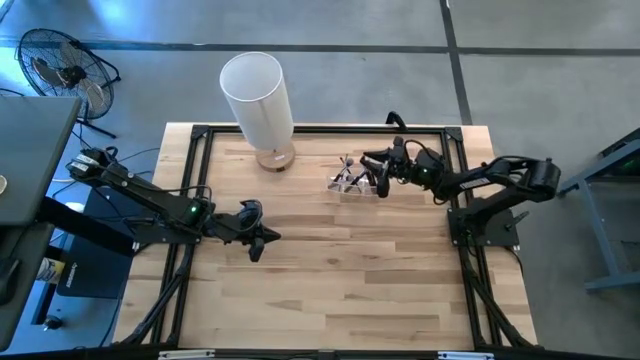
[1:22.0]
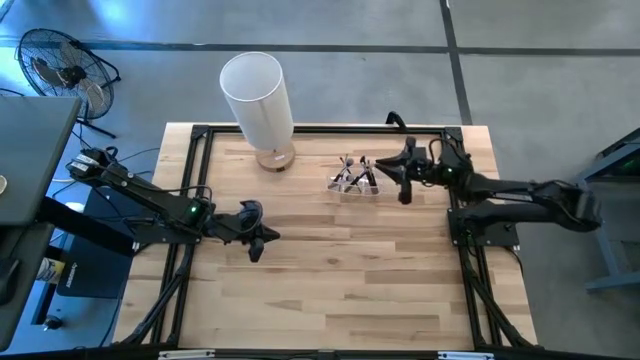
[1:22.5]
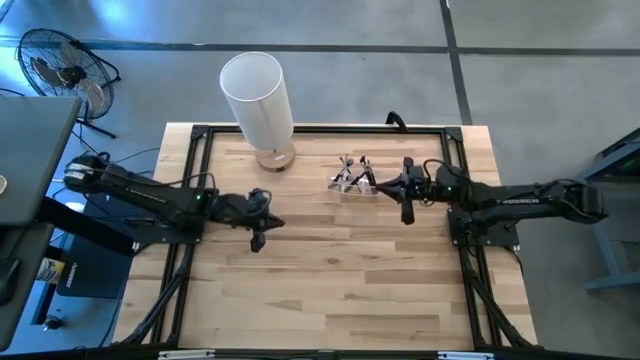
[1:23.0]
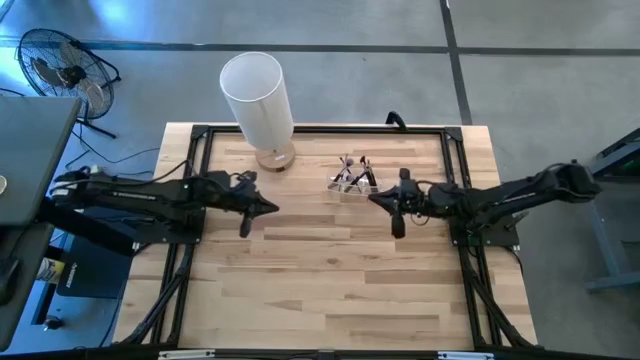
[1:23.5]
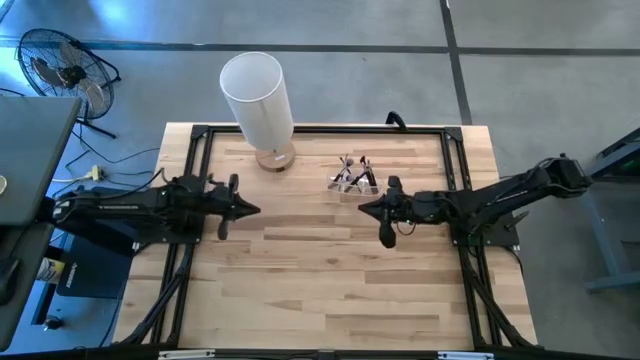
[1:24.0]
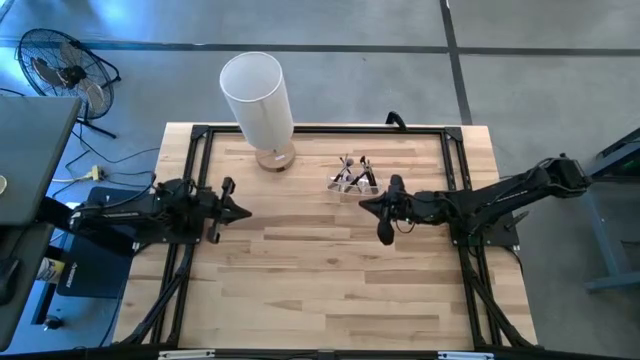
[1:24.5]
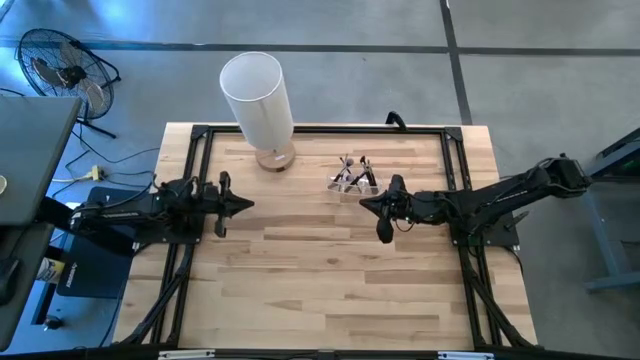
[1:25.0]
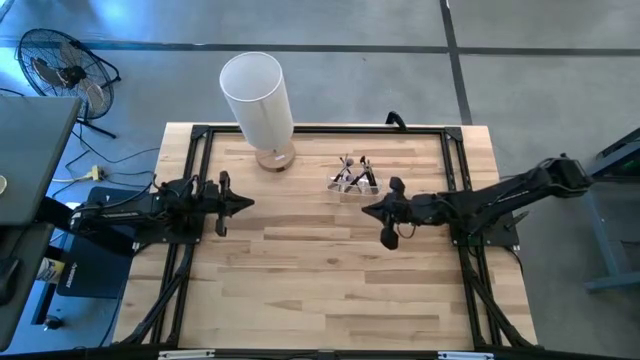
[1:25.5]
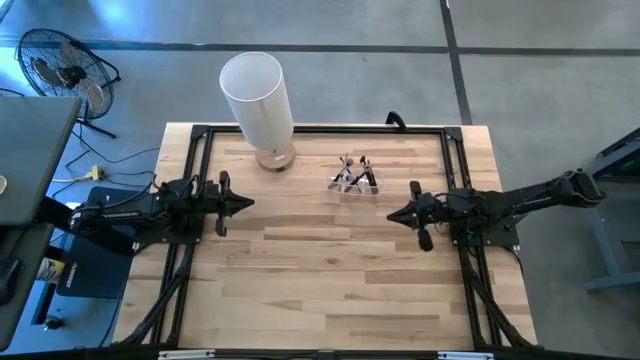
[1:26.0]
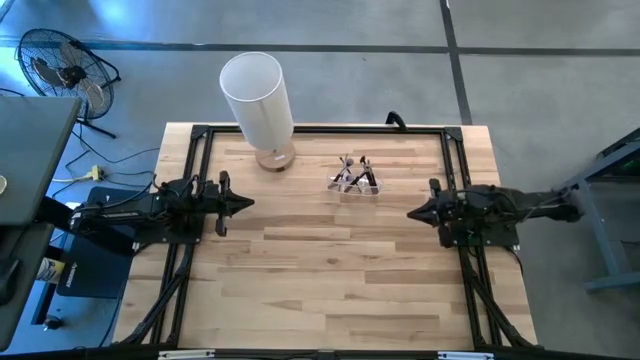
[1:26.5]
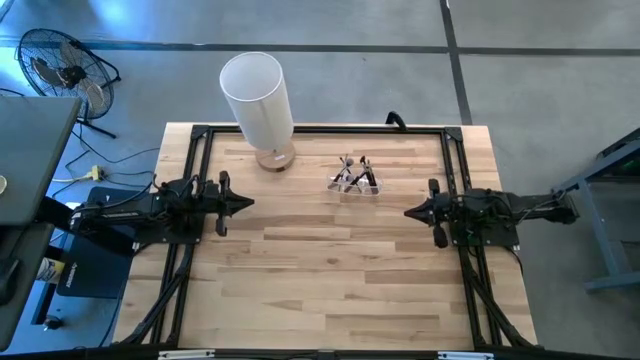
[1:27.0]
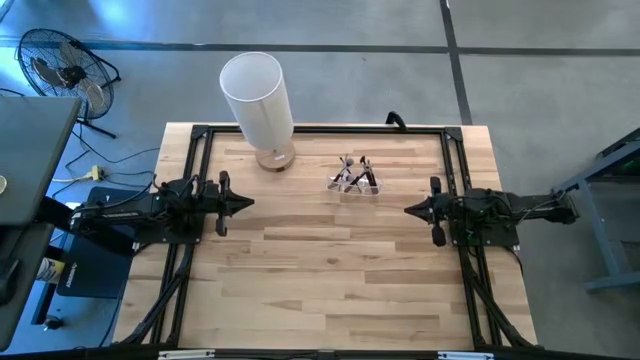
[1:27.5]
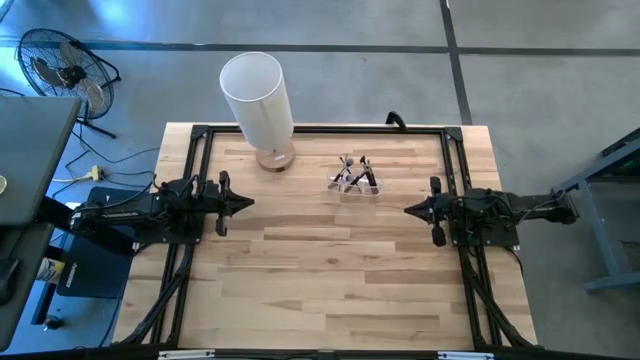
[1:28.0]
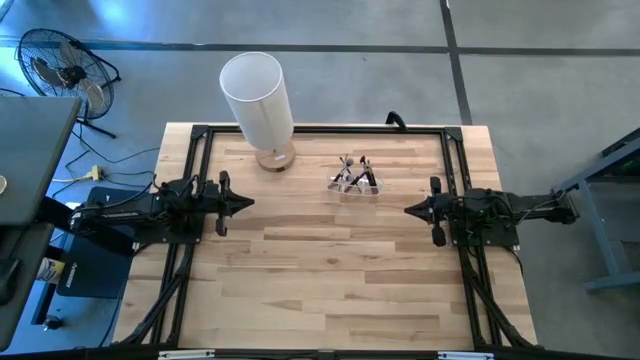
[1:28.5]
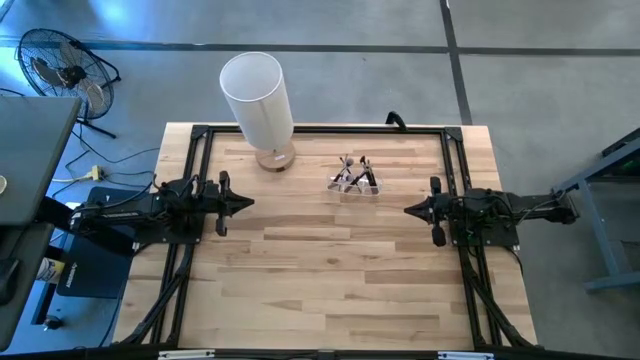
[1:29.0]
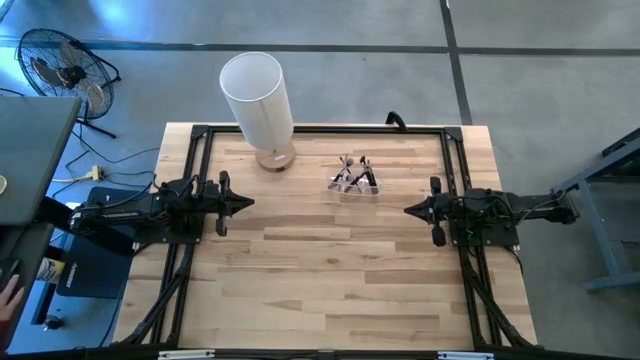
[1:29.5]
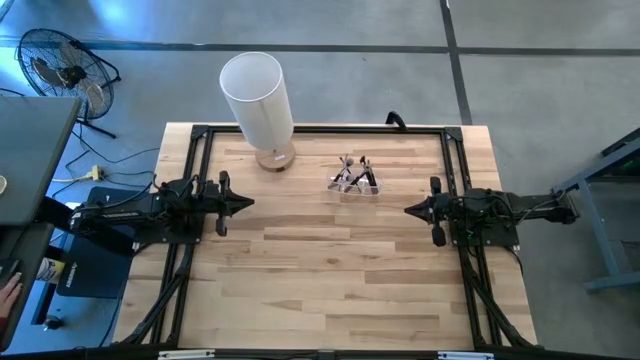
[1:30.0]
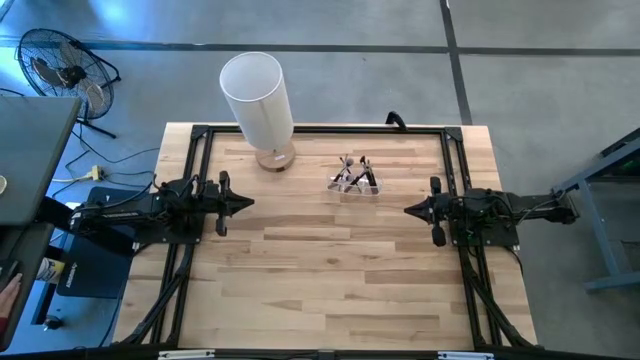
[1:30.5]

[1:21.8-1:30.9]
Task: Put items in baskets/containers
Return to Home Position

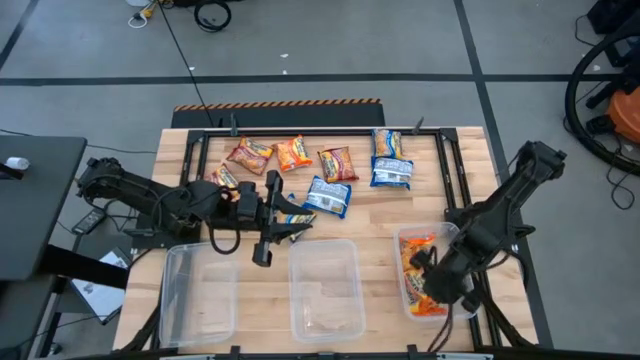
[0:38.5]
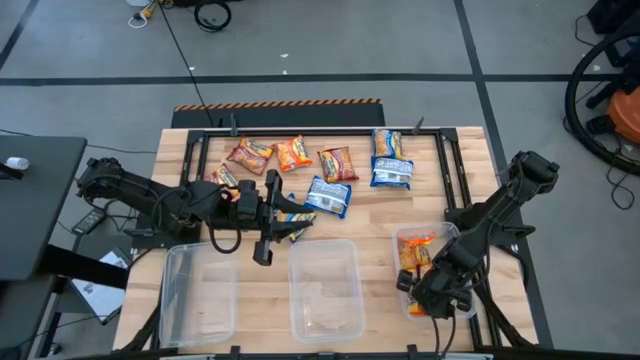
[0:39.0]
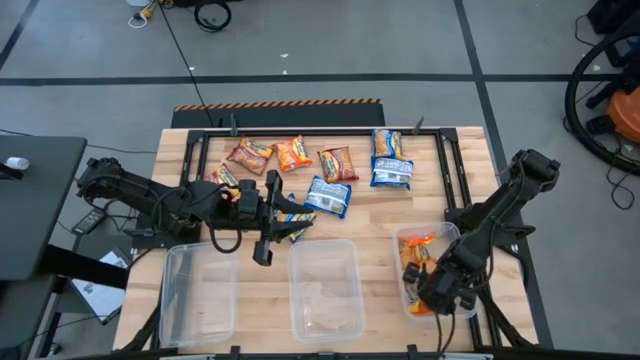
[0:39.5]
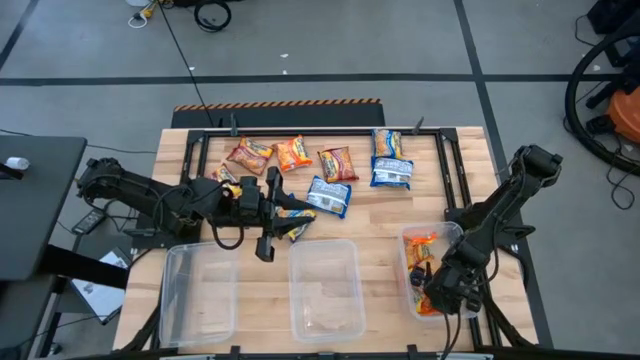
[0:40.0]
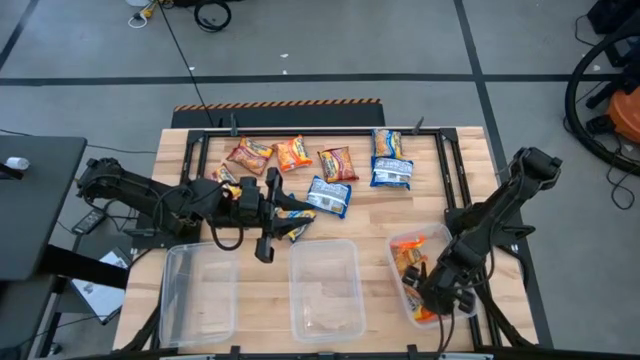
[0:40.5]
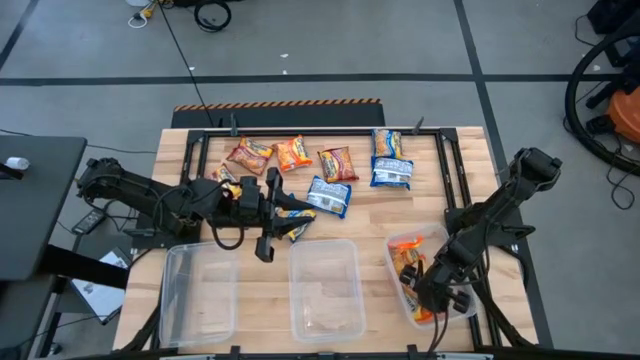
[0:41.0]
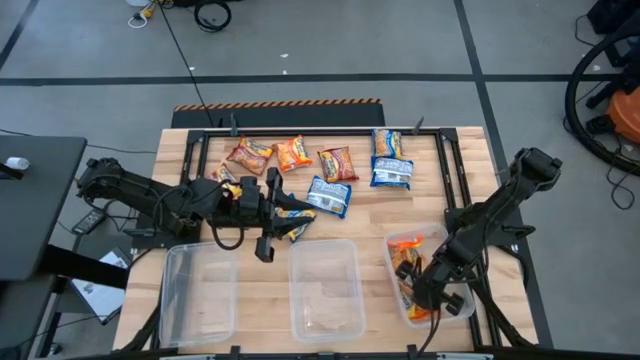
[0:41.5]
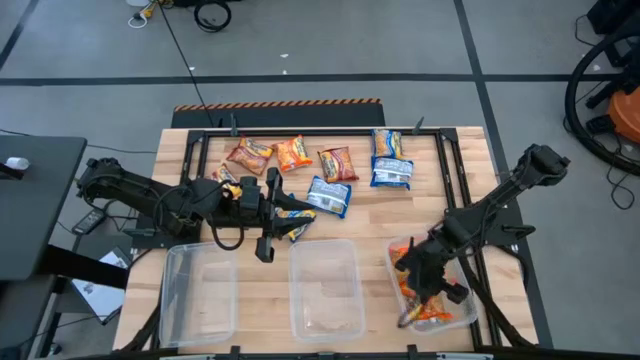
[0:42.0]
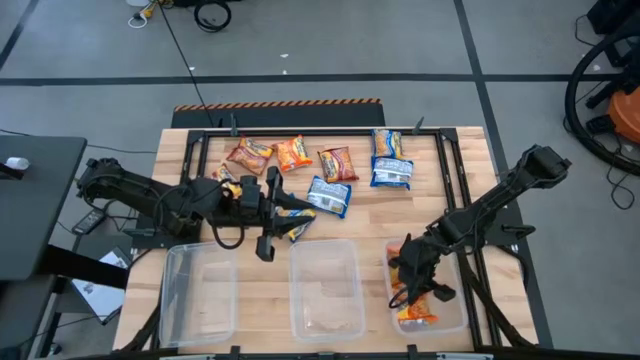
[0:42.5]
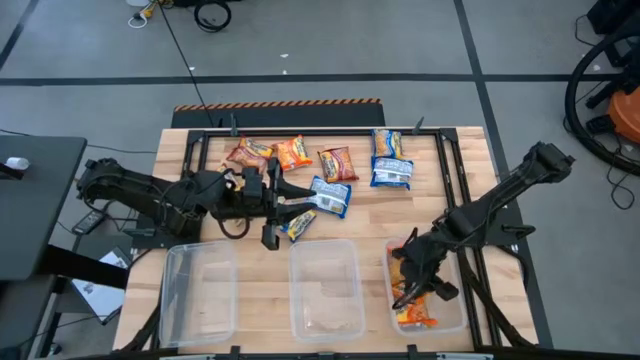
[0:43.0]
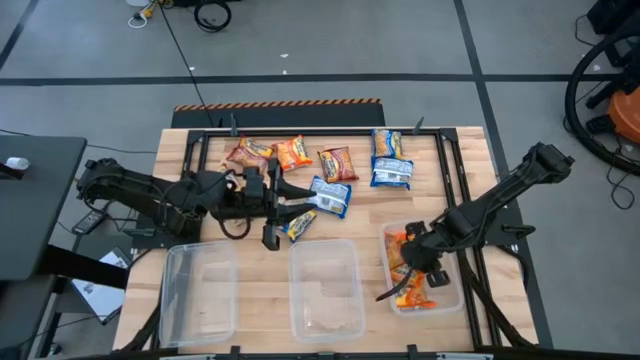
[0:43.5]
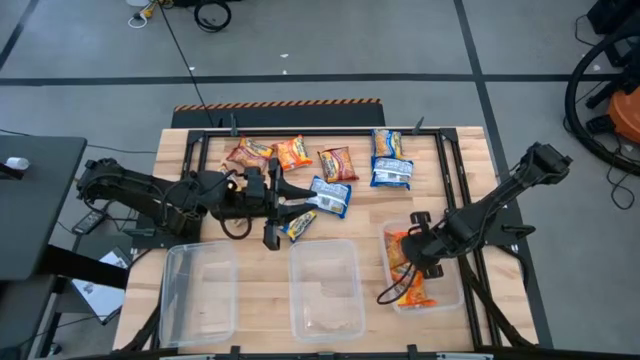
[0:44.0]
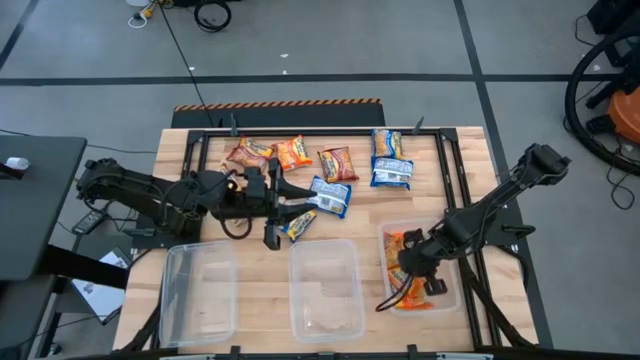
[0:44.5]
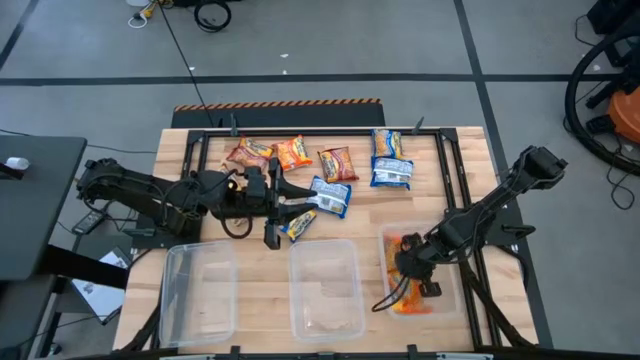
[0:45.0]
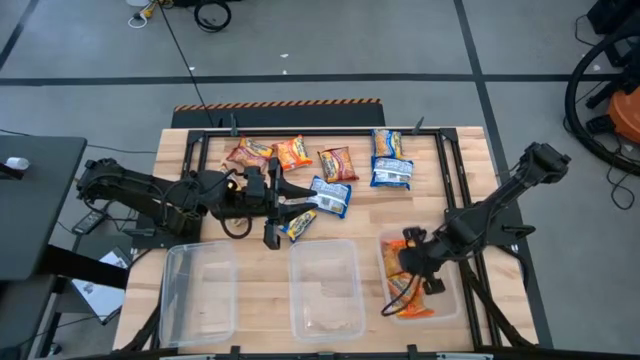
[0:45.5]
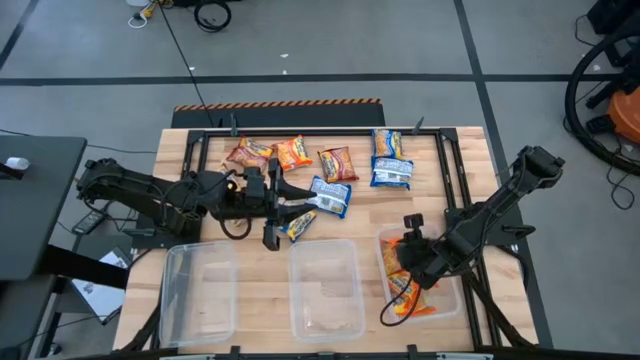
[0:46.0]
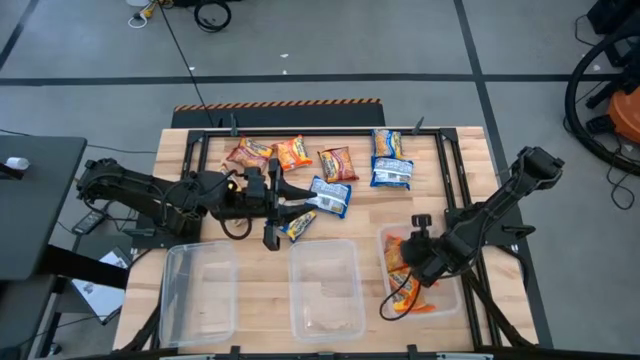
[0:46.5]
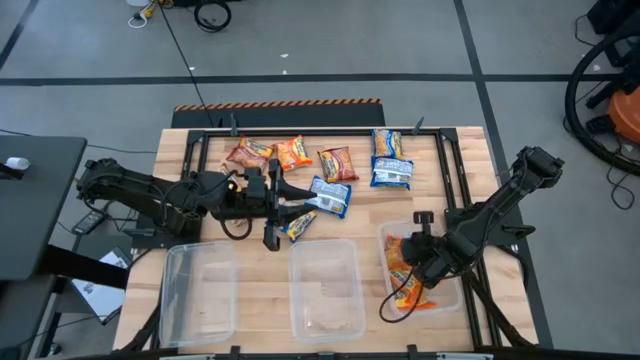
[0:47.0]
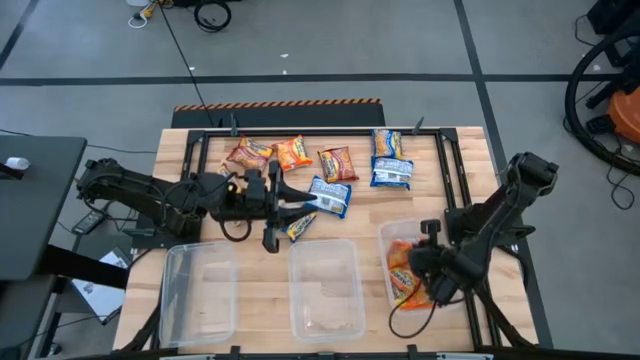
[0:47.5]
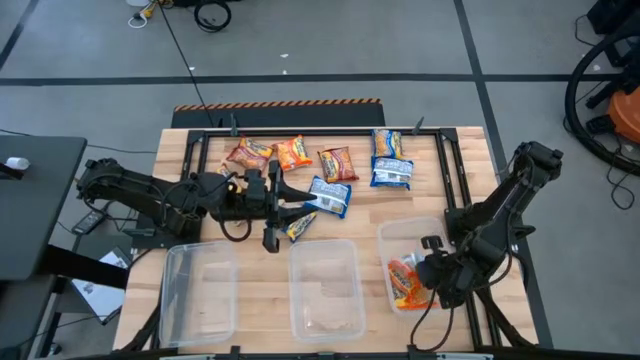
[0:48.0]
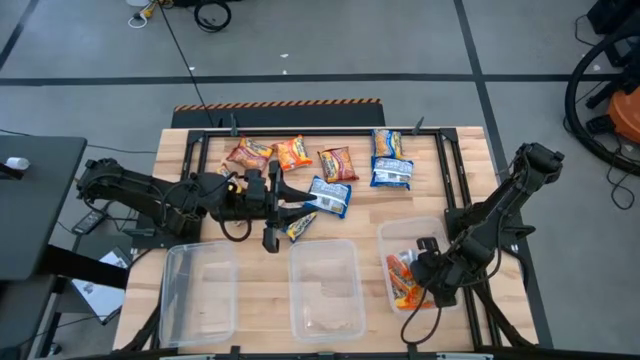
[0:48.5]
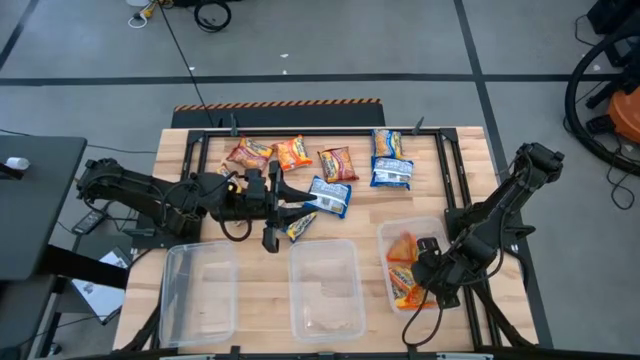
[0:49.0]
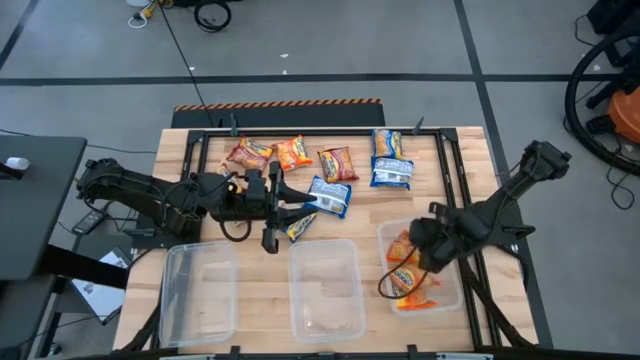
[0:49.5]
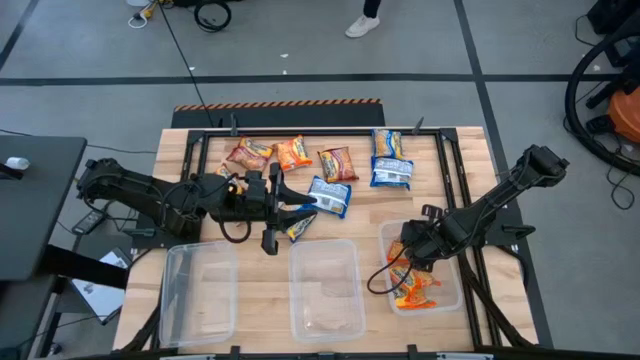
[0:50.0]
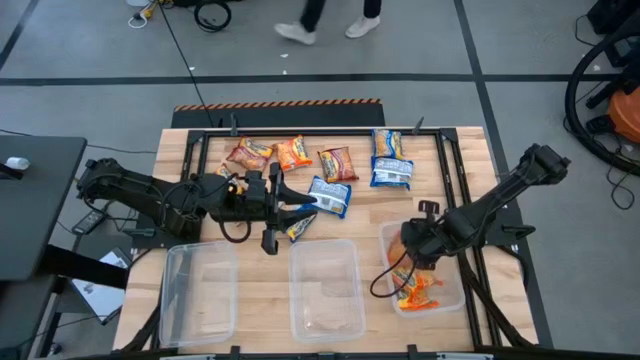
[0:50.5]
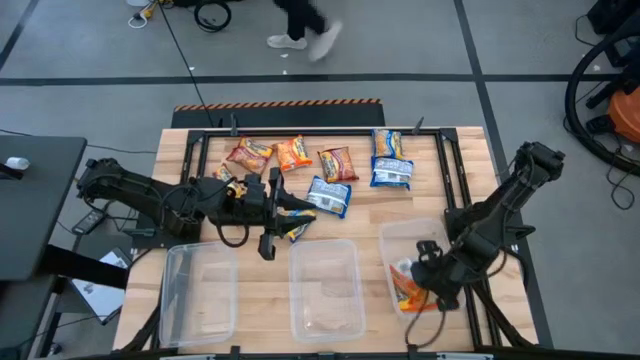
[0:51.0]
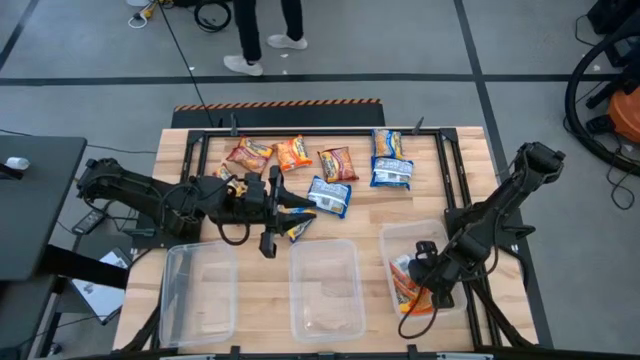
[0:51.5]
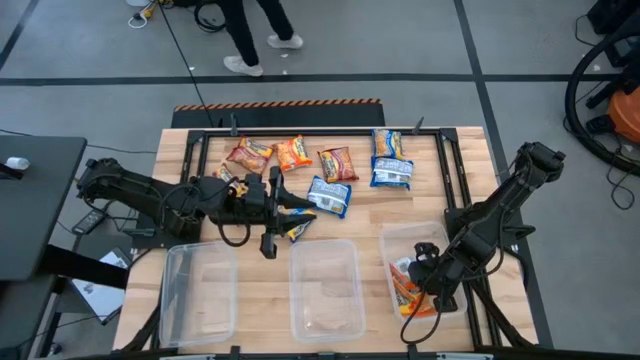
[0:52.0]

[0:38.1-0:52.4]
Task: Sort Maruchan noodles
Adjust the orange noodle pack on the right transparent bin
